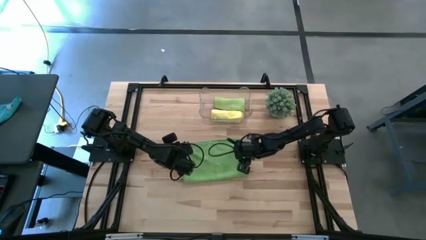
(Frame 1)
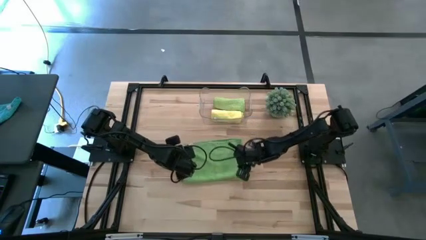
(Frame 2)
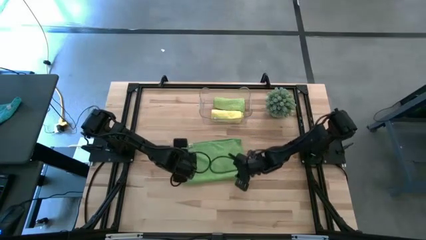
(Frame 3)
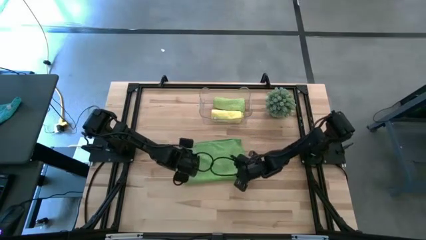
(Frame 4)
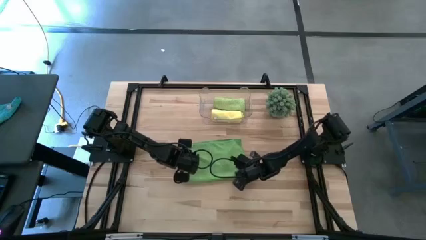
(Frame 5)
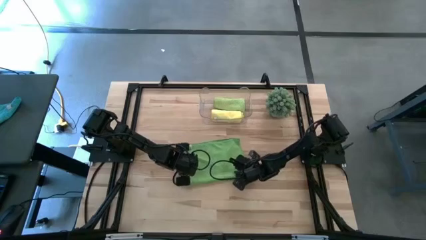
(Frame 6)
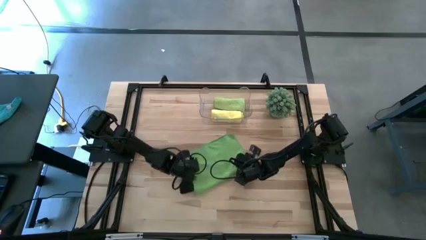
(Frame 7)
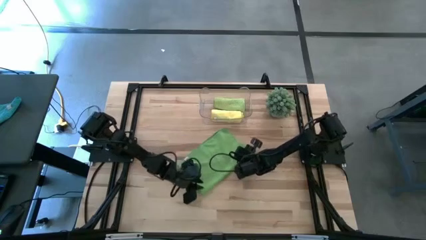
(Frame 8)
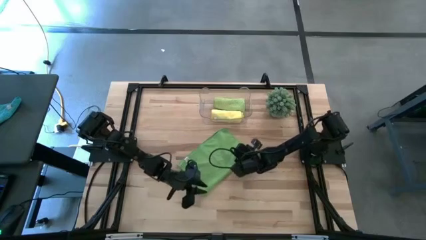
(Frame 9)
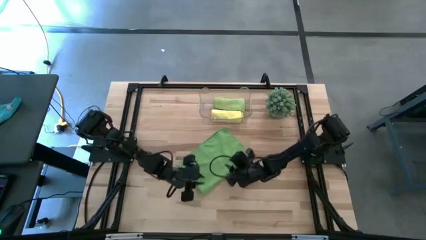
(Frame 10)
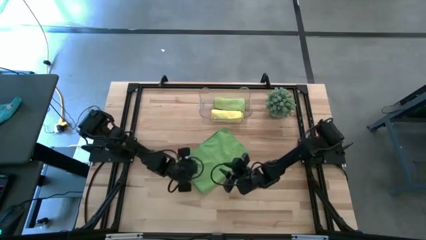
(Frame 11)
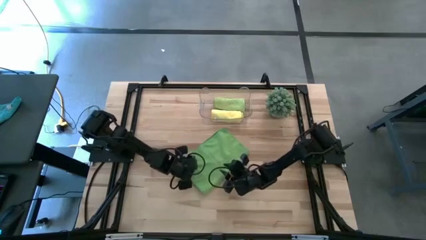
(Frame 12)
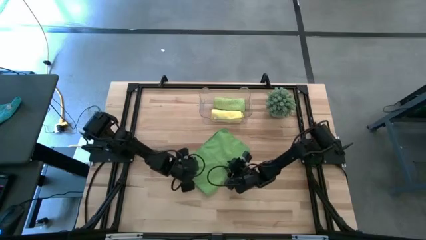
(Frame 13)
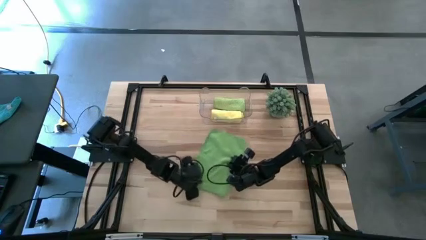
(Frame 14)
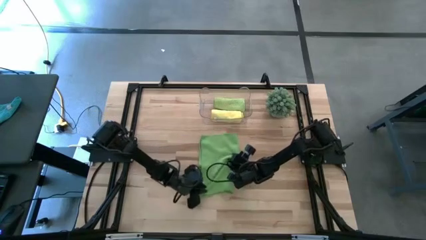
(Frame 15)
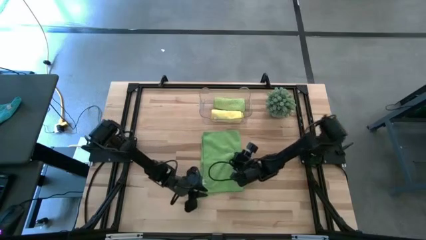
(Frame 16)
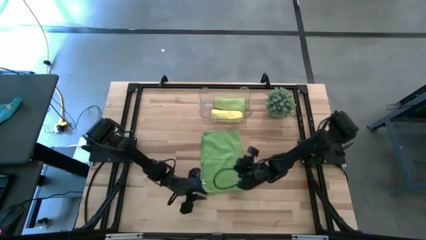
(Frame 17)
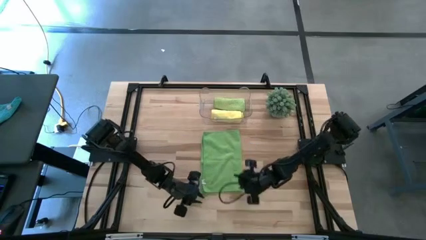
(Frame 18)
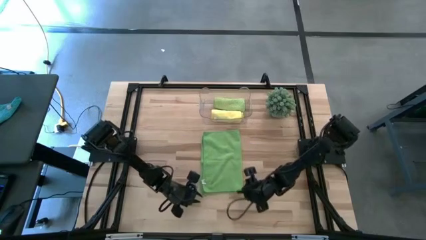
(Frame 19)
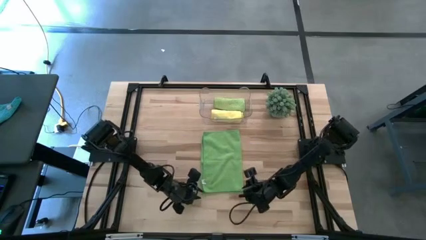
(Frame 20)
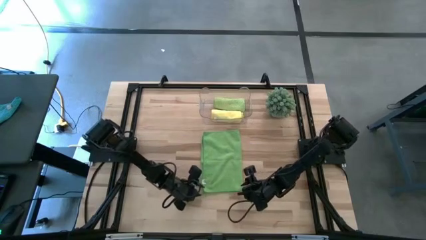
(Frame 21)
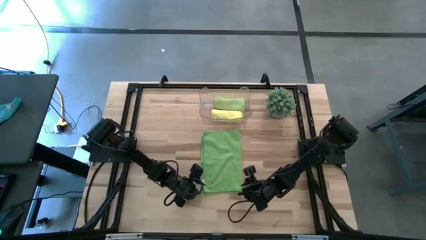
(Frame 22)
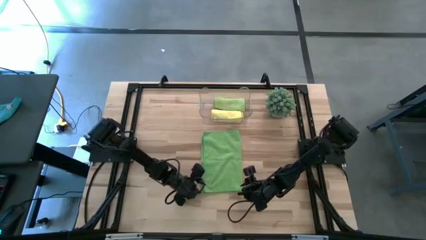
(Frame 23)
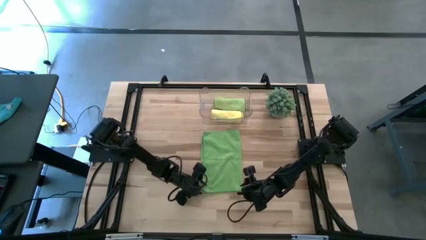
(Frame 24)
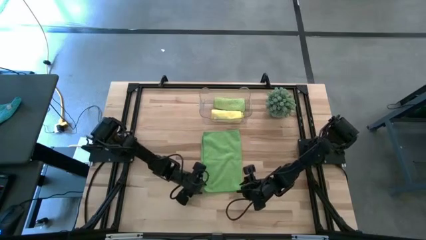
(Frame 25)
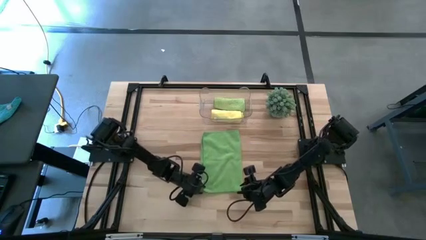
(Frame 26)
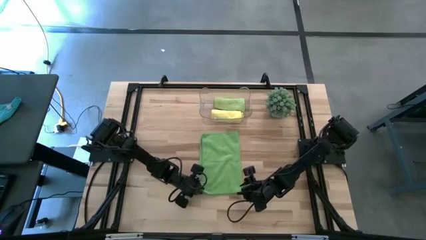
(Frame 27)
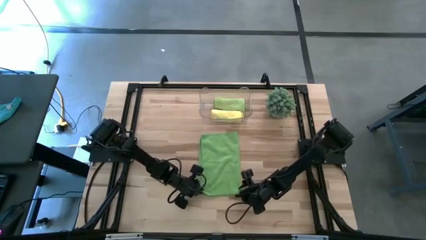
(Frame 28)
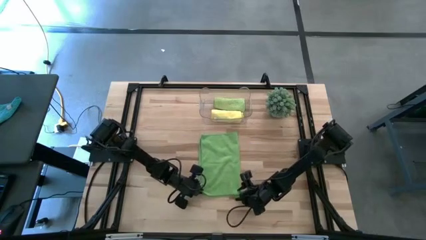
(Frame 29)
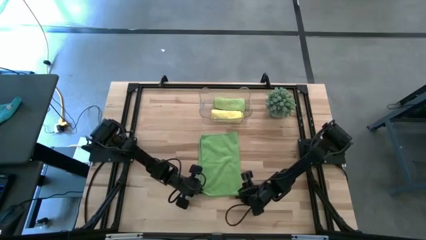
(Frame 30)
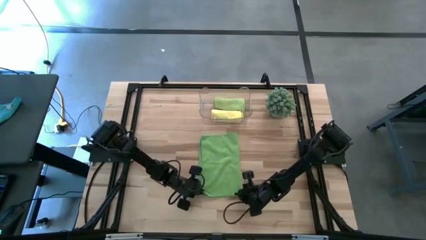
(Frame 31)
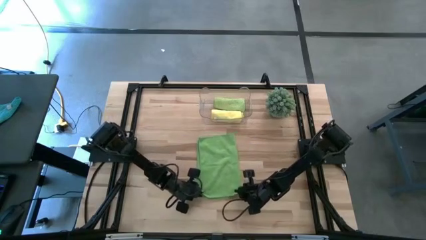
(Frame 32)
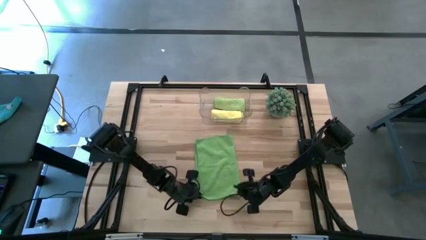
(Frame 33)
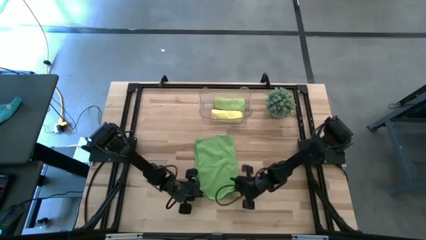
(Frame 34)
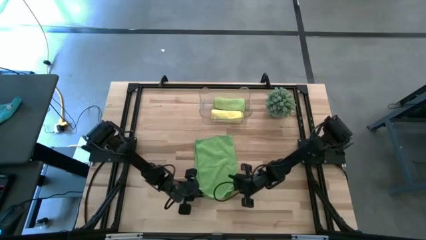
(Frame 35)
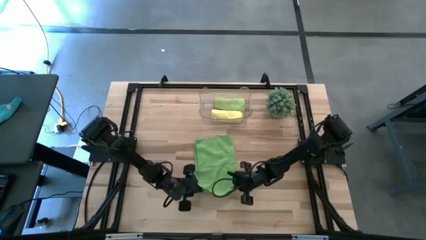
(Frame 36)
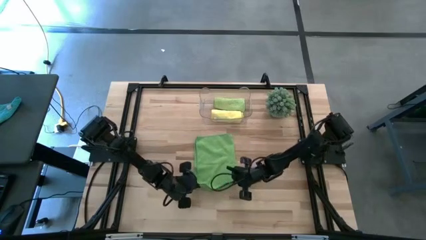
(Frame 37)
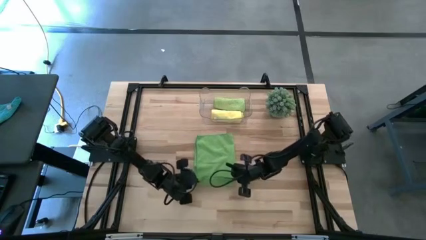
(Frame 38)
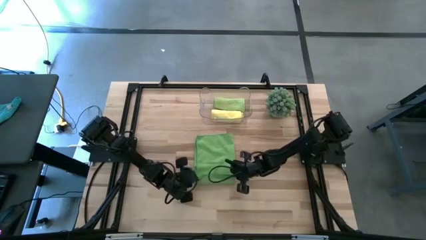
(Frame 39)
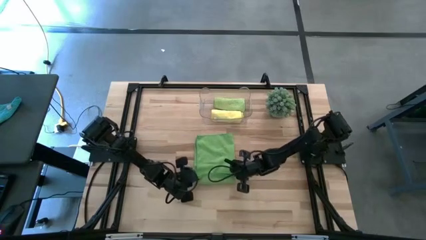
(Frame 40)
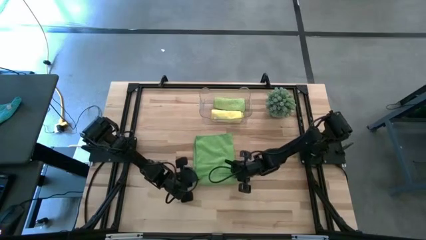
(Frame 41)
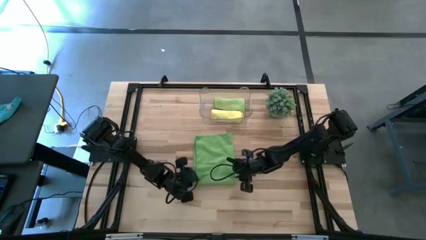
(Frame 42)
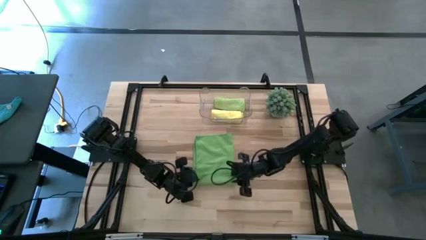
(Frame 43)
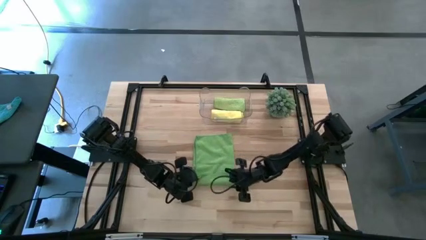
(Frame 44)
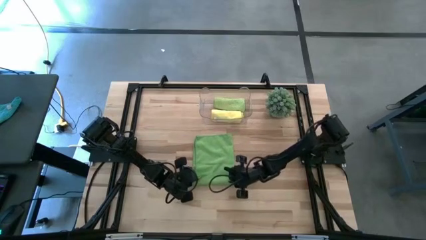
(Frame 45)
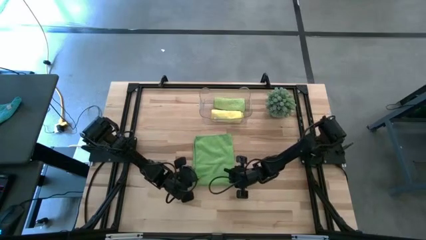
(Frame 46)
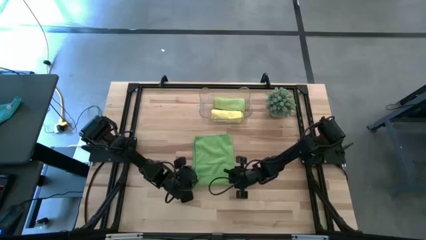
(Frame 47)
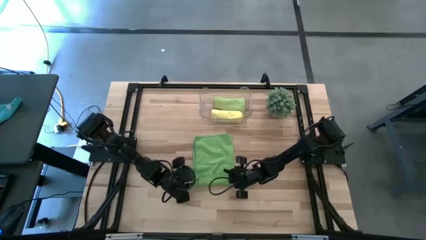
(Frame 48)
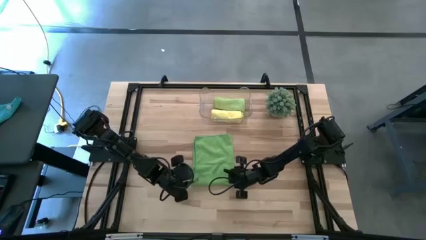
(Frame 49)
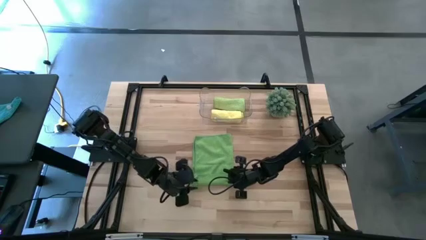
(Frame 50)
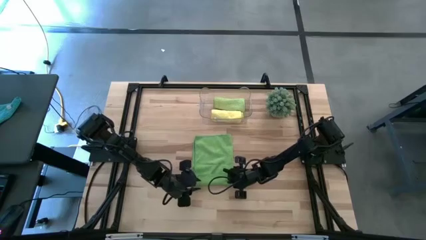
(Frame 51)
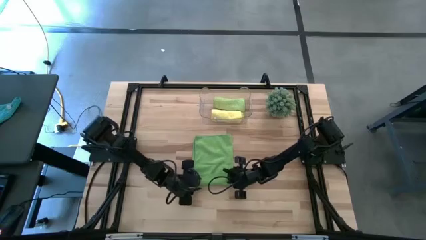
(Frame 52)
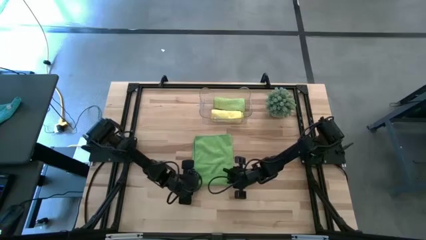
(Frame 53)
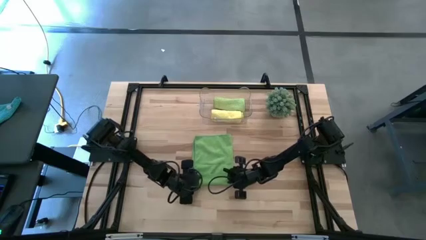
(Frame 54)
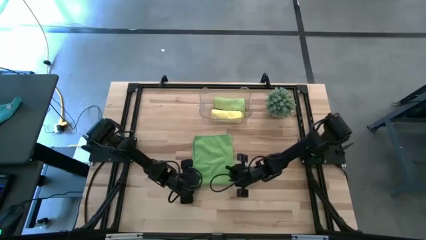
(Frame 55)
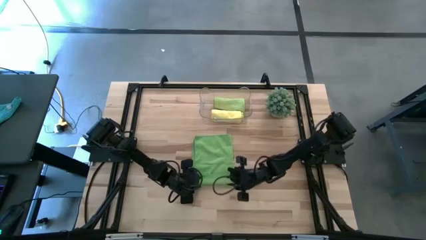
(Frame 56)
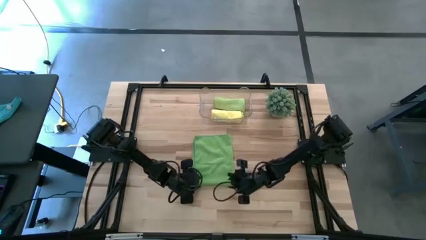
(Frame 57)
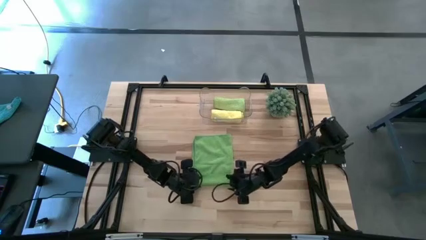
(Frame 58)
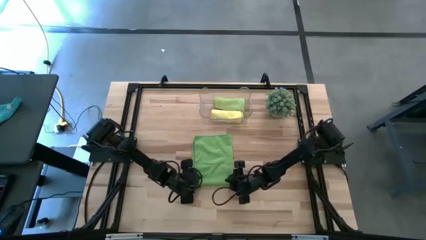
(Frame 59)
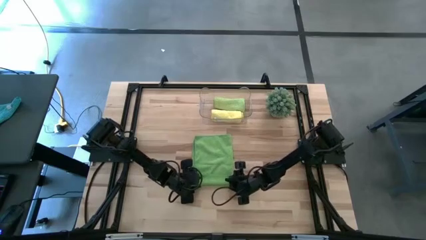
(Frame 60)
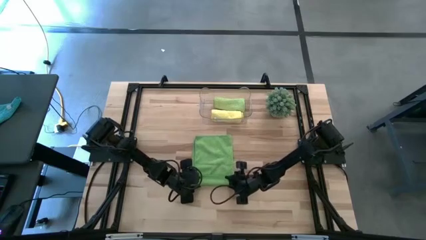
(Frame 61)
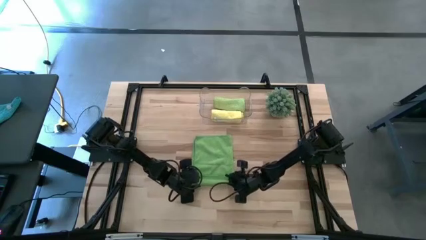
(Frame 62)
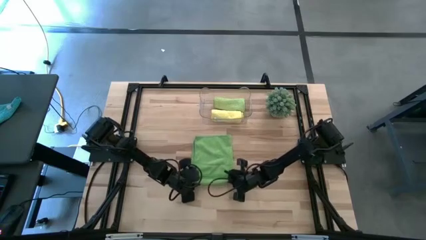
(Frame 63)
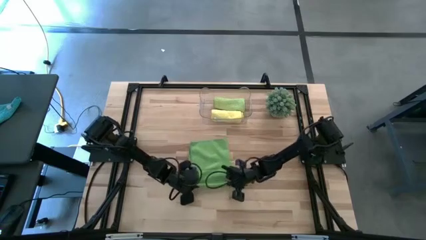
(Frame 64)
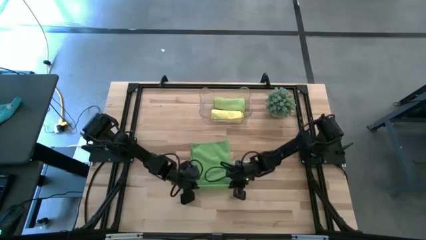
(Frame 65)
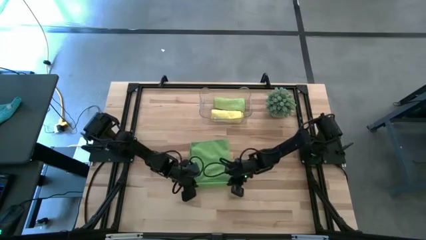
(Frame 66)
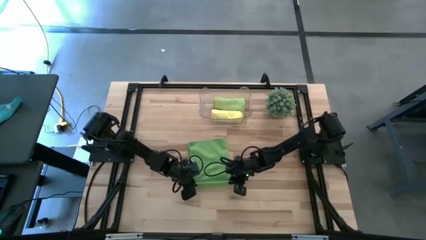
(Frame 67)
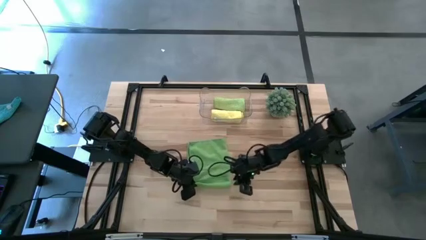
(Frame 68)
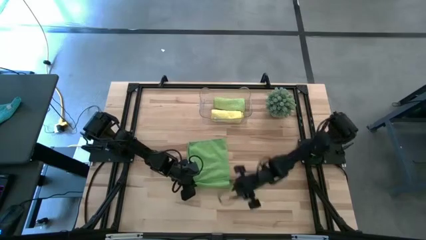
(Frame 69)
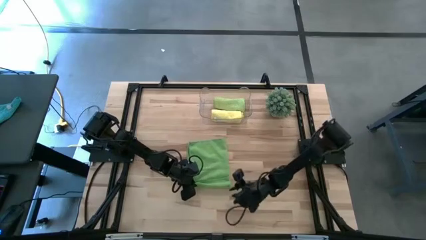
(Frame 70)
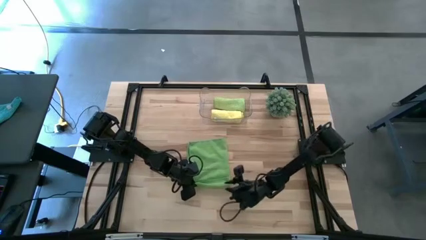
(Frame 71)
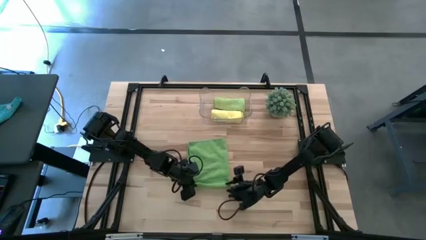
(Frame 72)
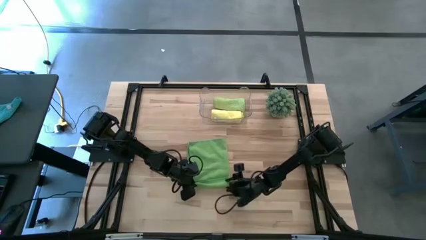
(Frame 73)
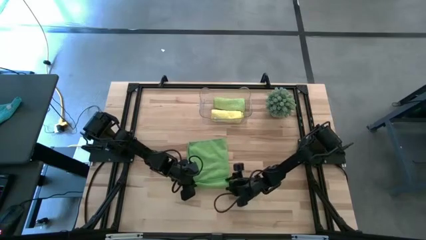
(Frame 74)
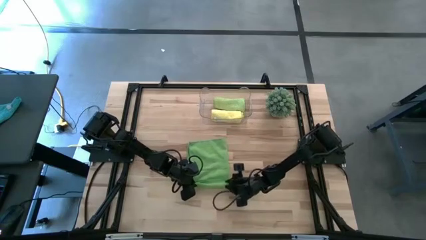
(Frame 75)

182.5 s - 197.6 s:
Task: Roll microfiber towels into tight, uniform cylinder then place into a basket
Roll the green microfiber towel
